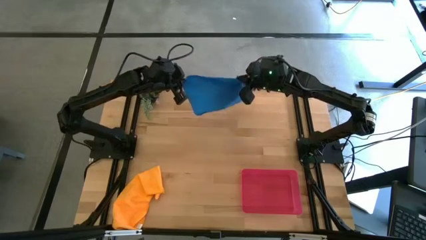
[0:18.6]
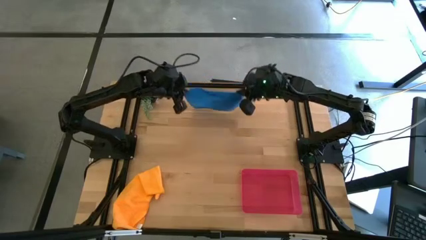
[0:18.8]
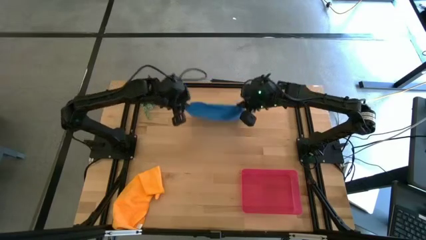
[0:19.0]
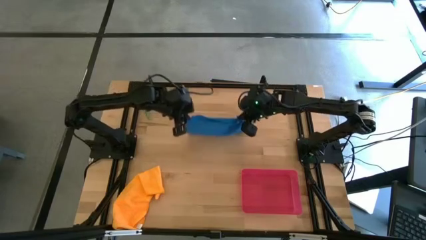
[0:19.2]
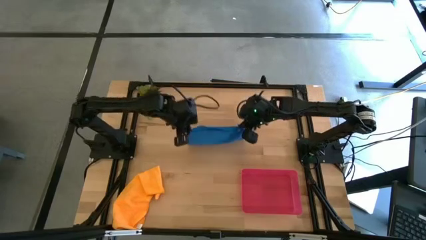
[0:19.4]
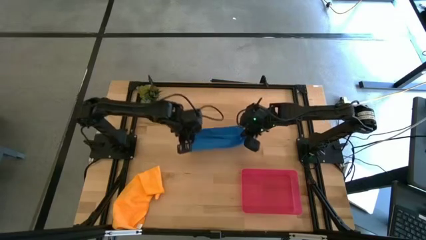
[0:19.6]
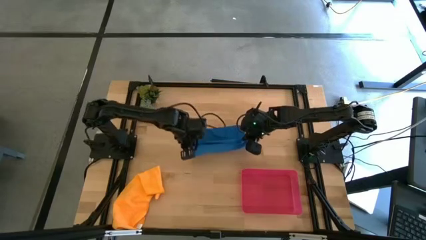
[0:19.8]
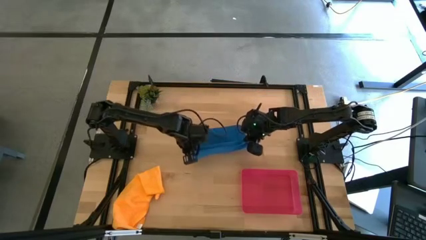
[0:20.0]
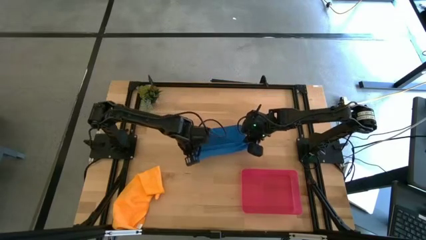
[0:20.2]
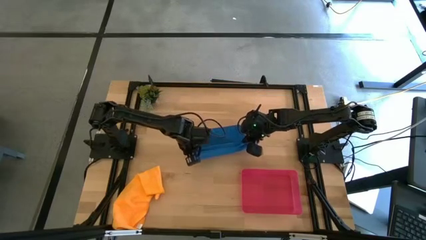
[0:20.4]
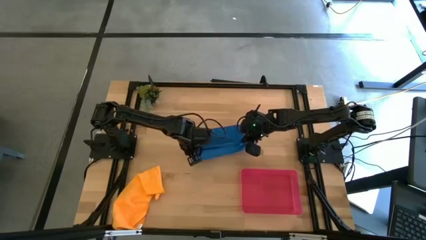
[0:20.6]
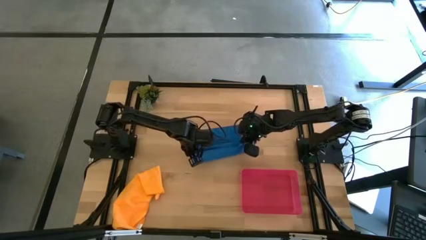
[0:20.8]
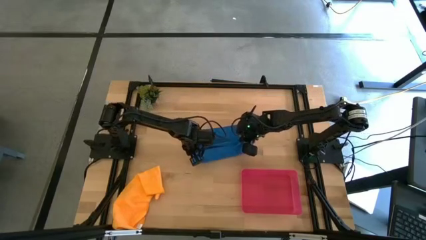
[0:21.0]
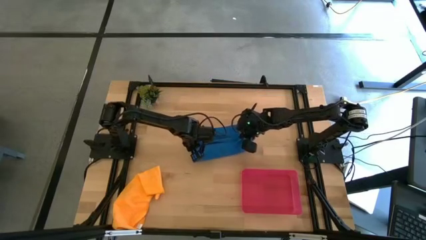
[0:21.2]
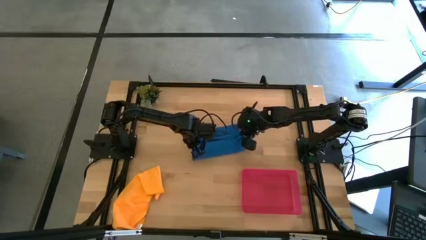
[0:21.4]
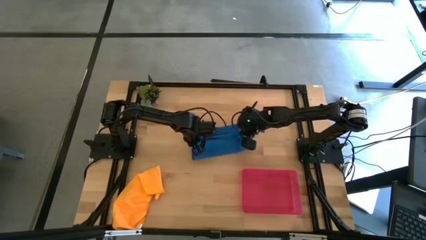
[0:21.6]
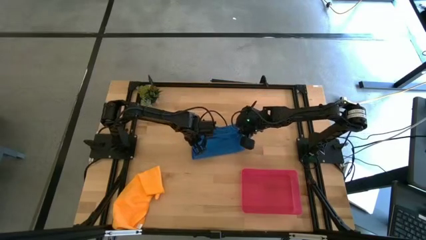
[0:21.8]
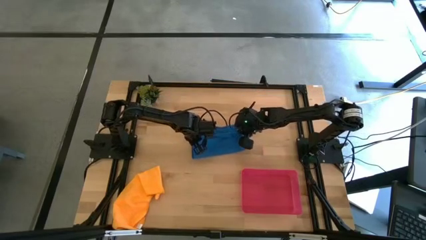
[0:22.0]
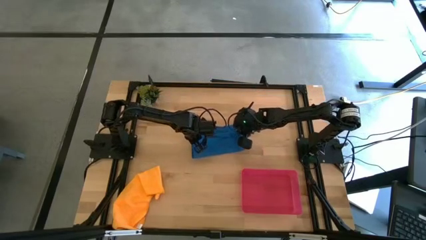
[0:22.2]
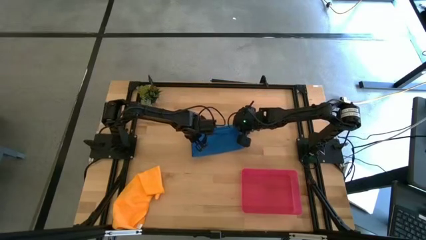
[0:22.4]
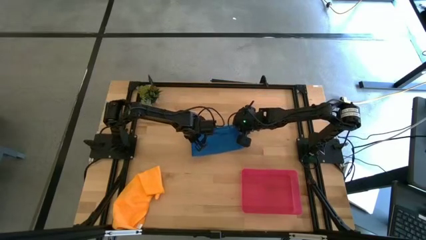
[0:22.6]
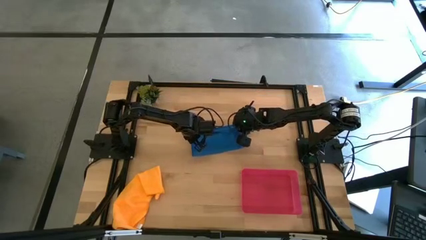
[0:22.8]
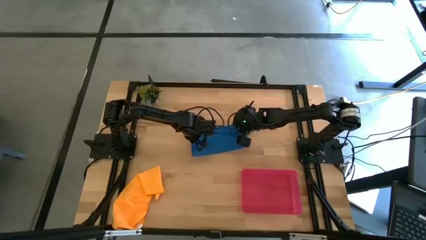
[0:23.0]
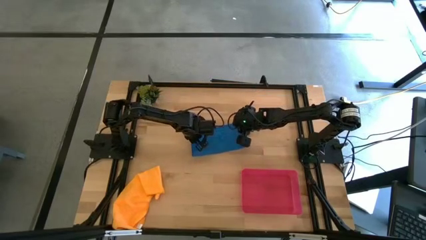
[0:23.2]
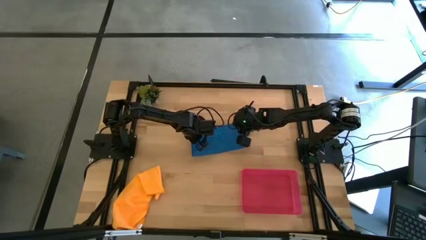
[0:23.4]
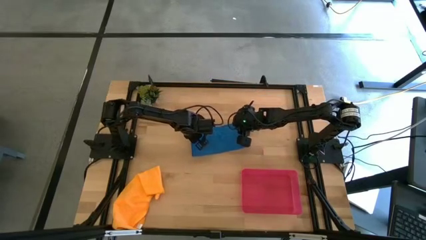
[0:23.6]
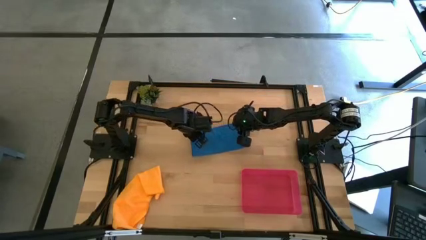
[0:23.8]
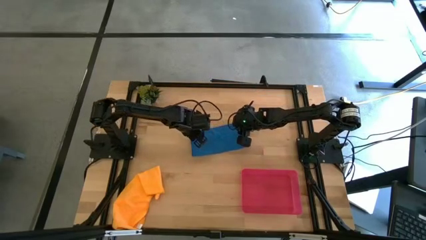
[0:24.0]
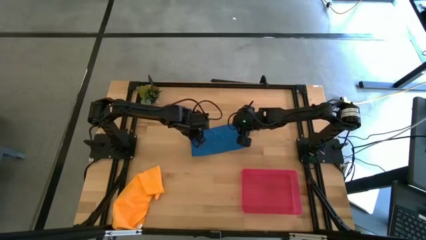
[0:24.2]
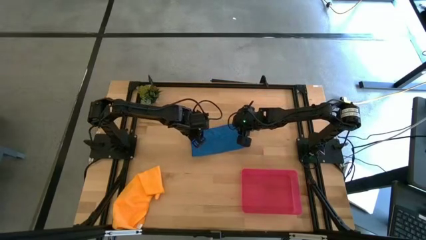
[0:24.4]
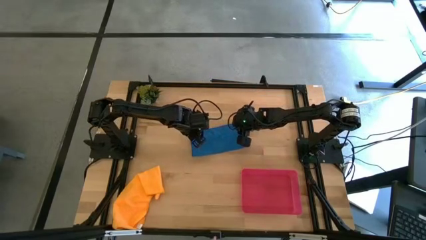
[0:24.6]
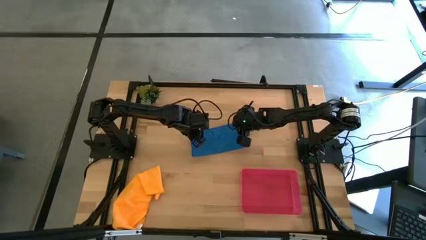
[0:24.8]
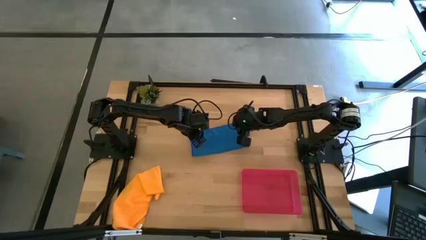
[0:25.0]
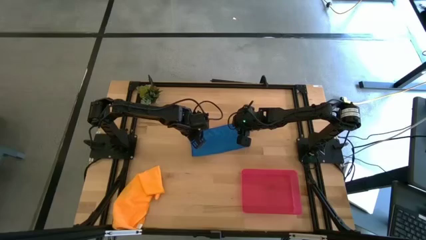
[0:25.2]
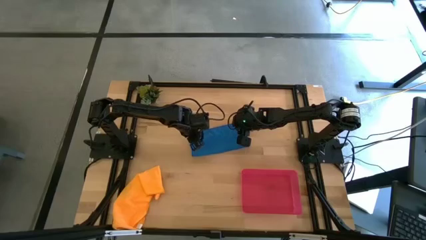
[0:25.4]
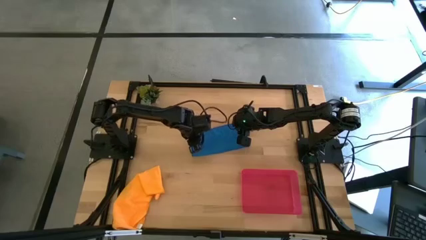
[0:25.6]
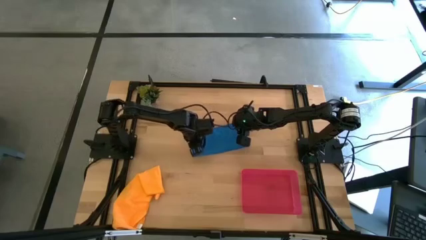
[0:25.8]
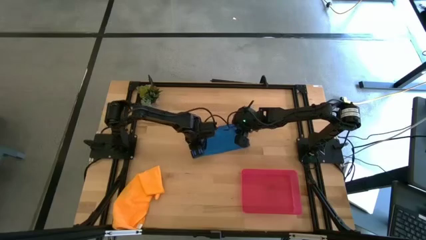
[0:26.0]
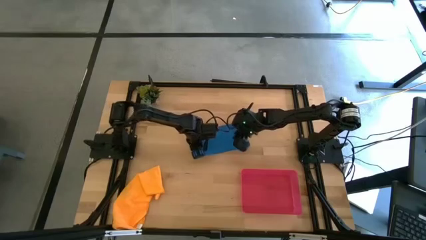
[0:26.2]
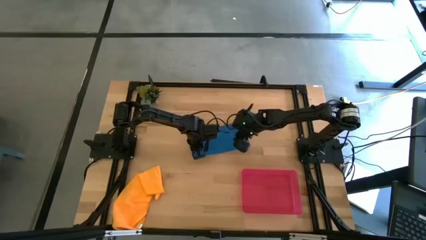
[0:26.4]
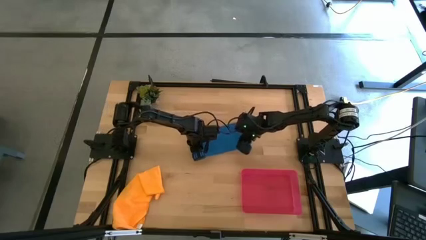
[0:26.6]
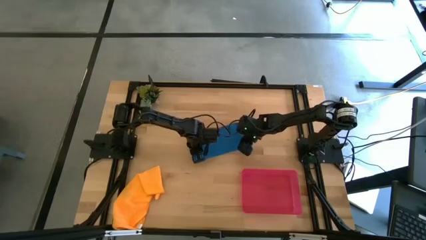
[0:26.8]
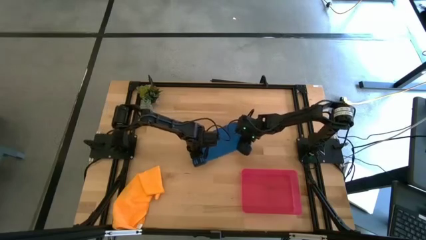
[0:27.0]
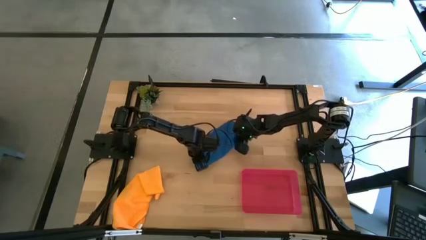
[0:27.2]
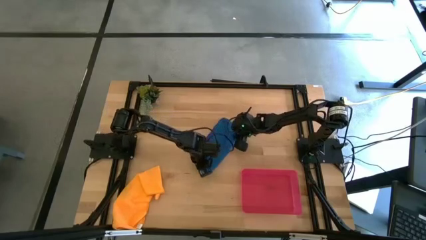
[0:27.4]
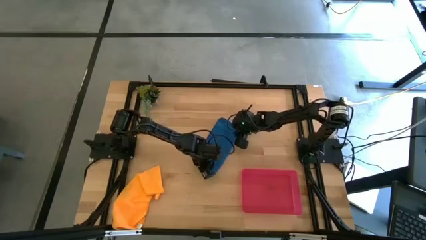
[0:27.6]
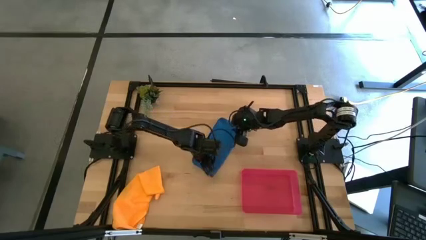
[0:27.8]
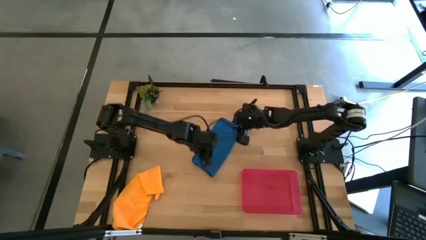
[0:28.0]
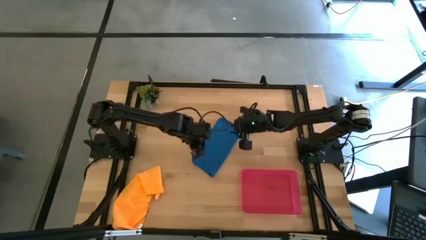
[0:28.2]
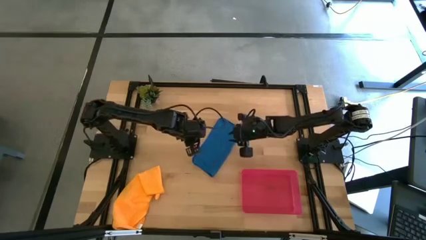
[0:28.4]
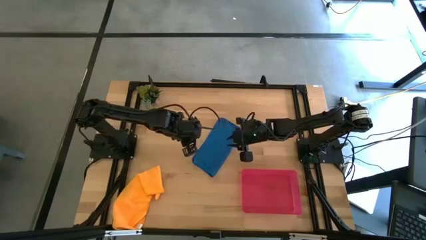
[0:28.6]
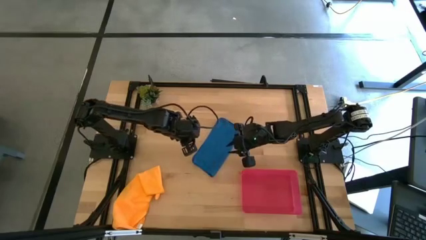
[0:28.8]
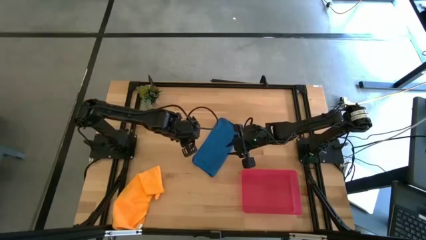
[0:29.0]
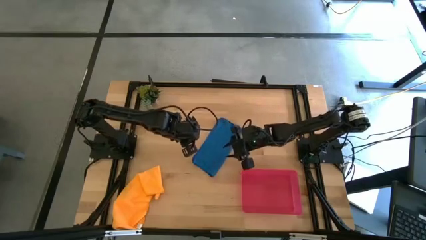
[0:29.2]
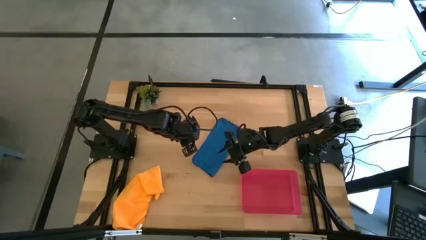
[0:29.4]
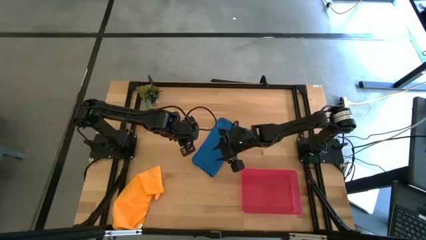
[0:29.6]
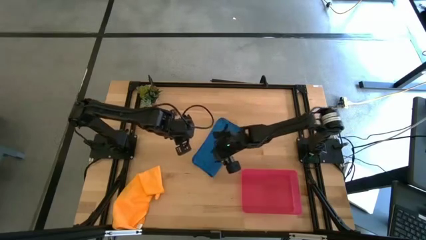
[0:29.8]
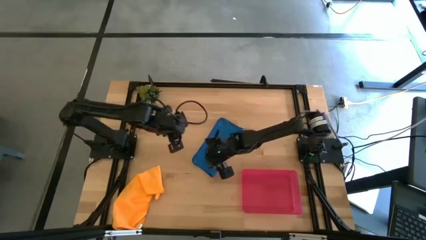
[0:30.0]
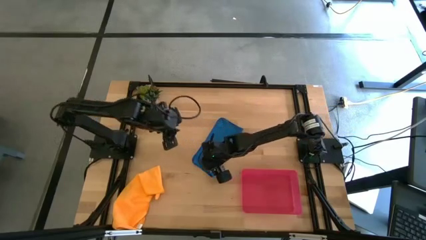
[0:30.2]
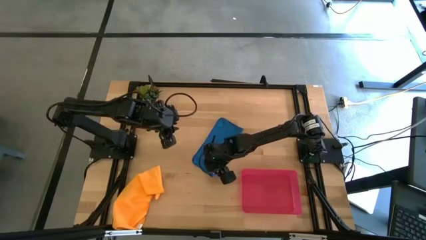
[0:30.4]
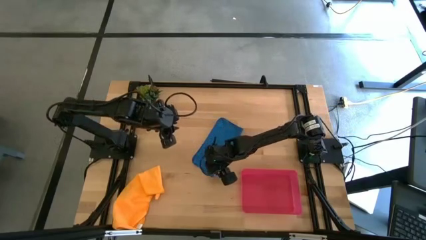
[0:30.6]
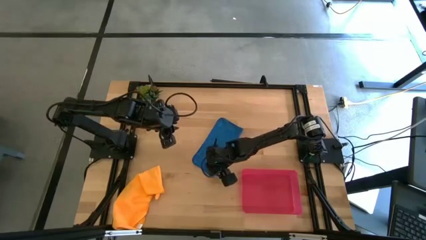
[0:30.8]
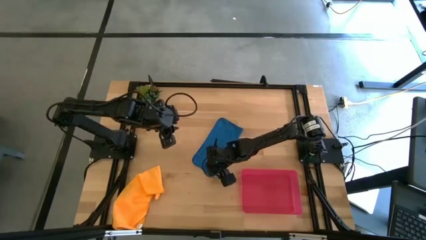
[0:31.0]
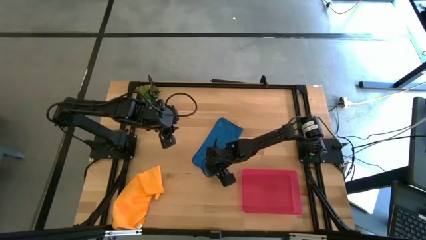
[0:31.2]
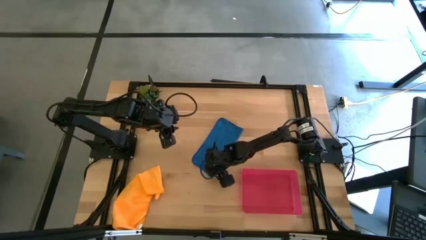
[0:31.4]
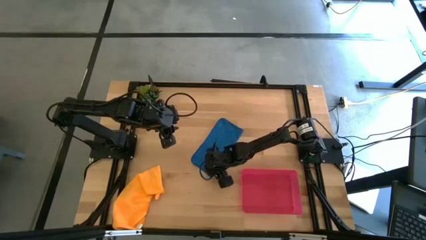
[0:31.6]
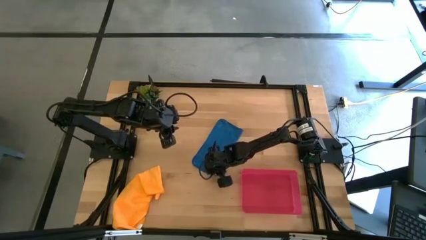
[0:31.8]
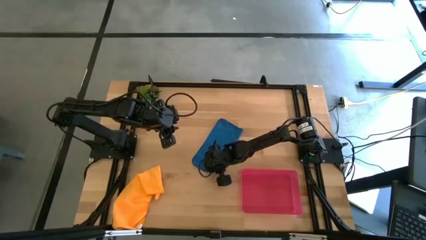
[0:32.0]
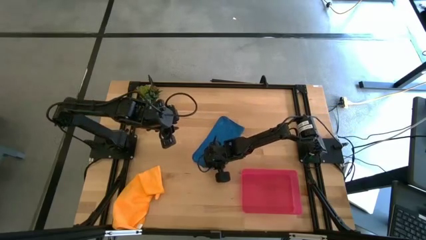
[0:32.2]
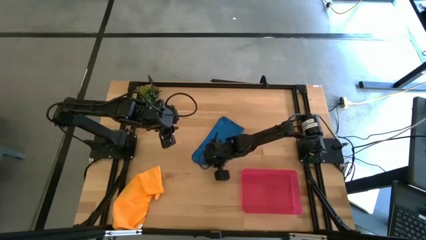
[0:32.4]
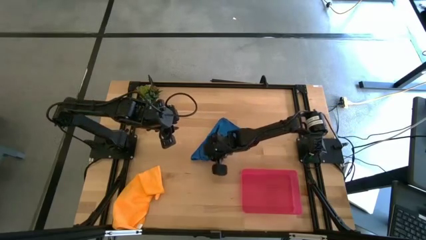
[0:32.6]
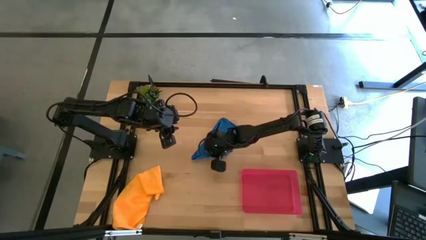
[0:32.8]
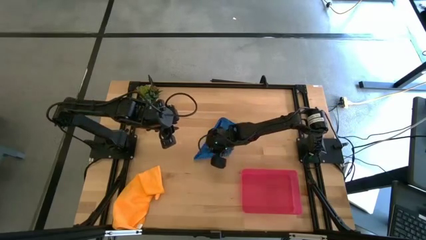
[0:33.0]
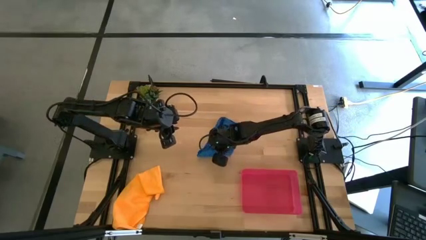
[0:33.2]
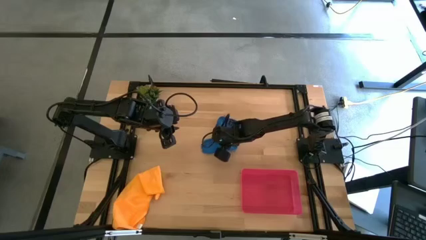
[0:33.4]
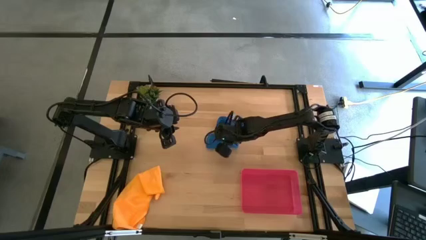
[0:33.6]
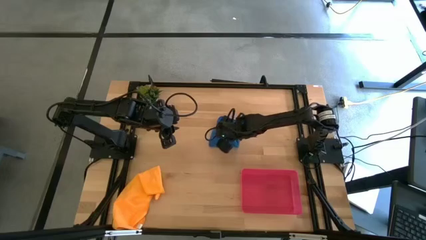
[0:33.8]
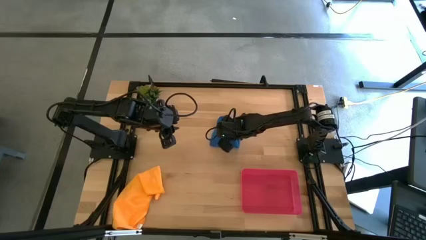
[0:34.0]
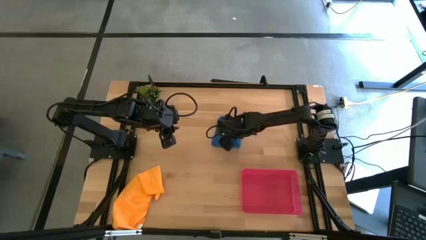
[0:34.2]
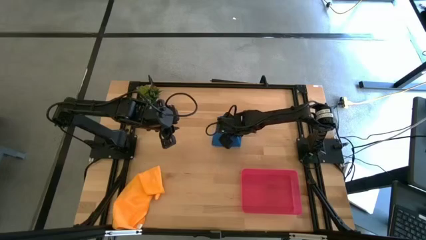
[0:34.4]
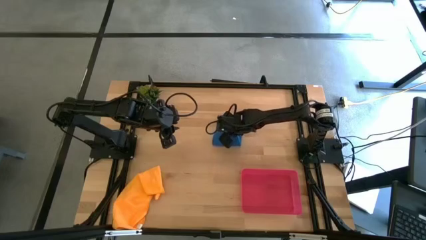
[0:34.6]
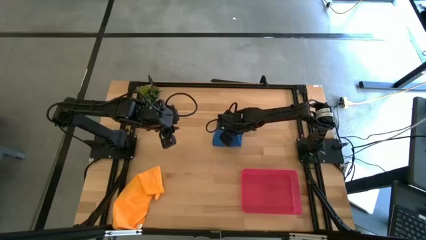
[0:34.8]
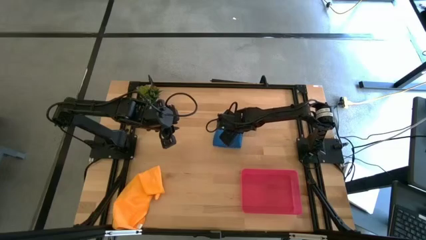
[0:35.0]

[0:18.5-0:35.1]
Task: Roll microfiber towels into tight, uniform cylinder then place into a basket
Fold the blue microfiber towel
